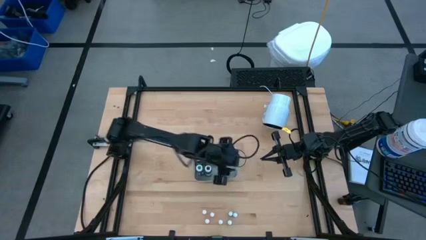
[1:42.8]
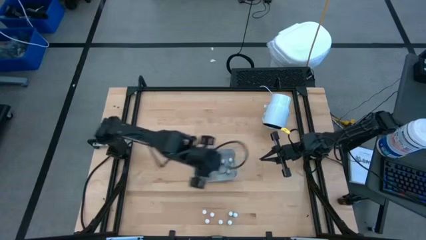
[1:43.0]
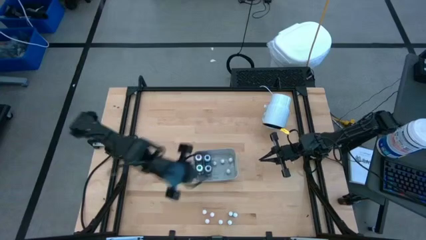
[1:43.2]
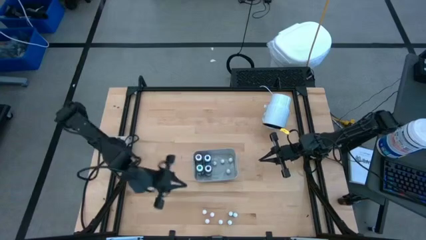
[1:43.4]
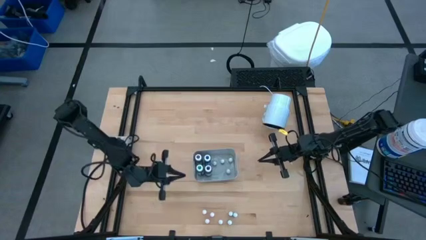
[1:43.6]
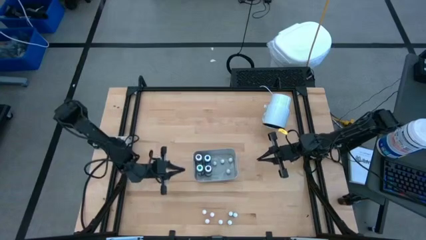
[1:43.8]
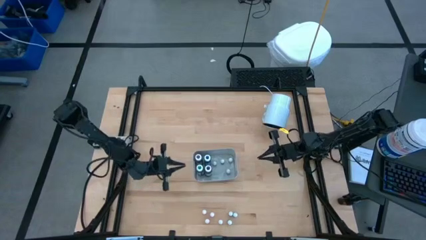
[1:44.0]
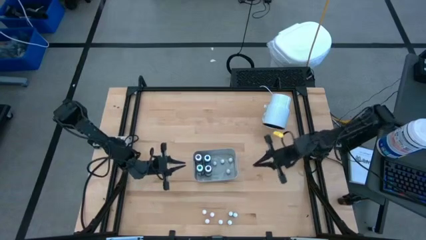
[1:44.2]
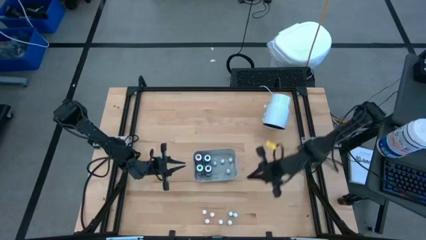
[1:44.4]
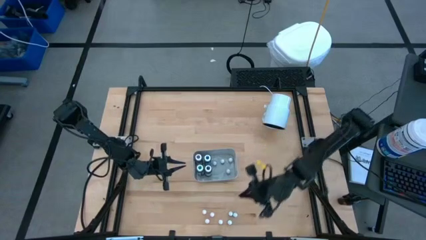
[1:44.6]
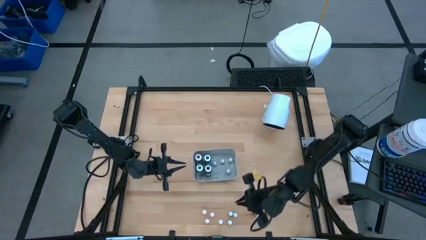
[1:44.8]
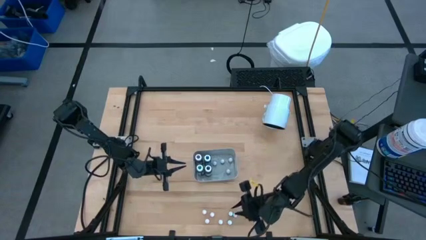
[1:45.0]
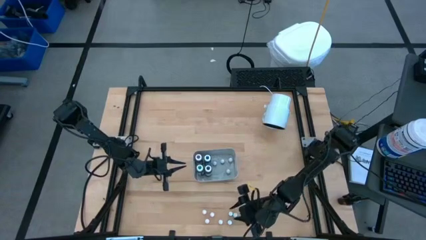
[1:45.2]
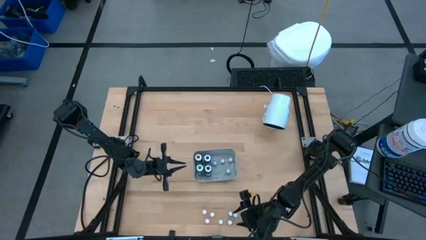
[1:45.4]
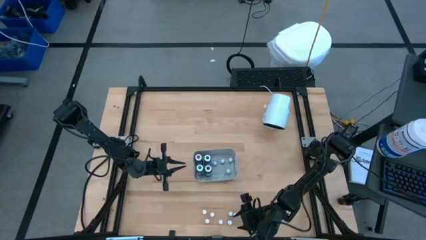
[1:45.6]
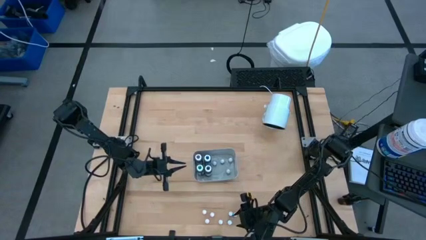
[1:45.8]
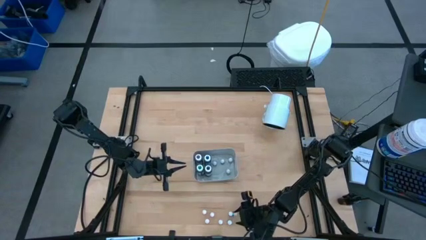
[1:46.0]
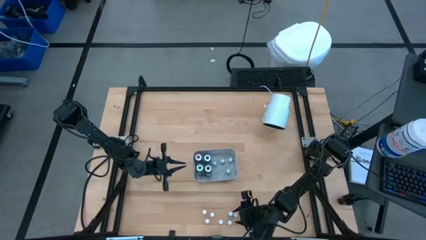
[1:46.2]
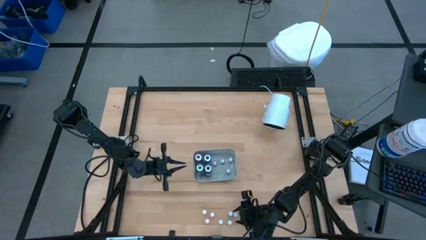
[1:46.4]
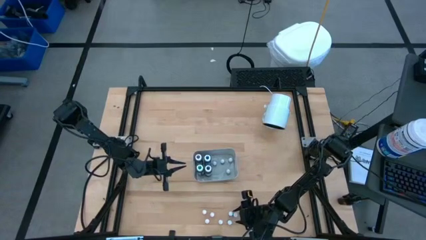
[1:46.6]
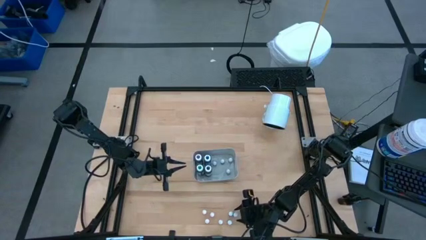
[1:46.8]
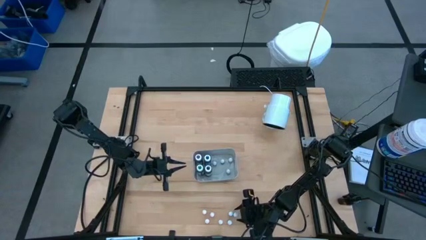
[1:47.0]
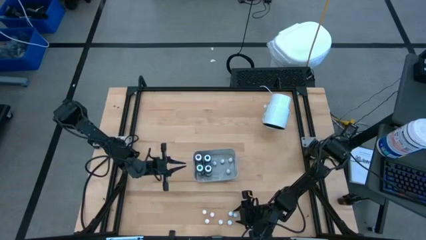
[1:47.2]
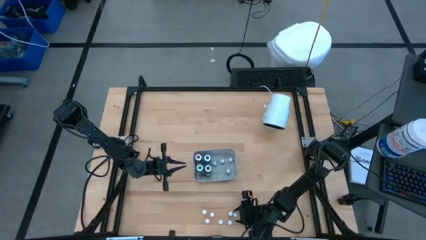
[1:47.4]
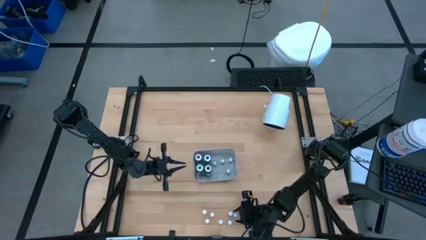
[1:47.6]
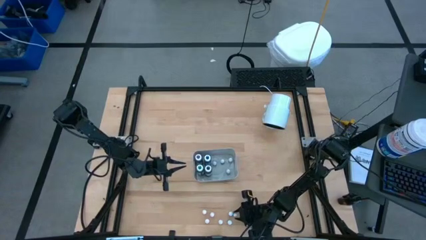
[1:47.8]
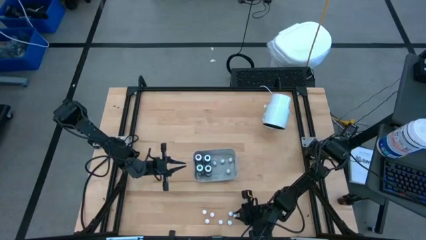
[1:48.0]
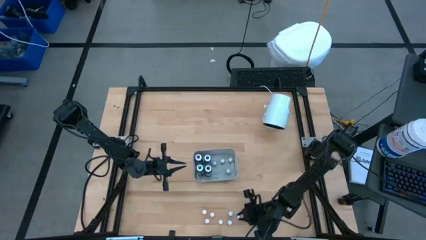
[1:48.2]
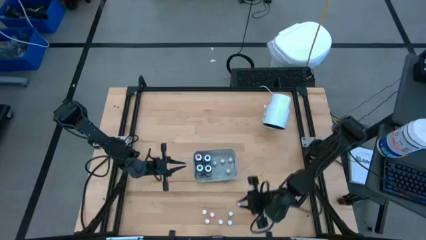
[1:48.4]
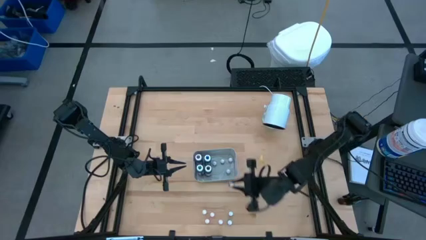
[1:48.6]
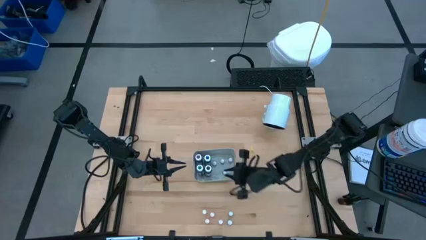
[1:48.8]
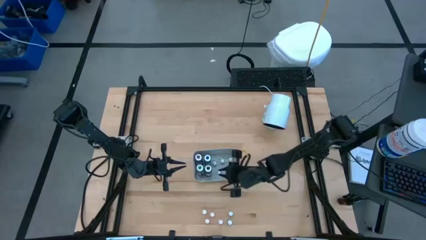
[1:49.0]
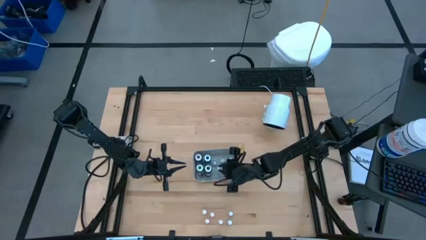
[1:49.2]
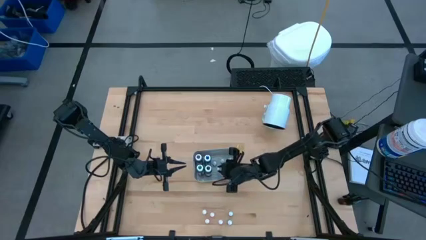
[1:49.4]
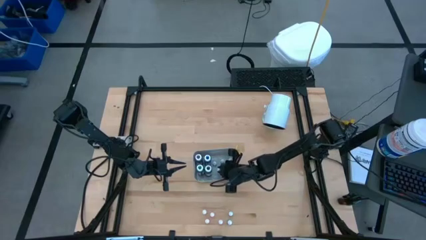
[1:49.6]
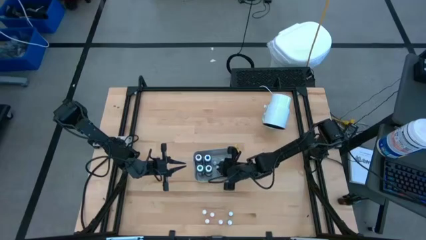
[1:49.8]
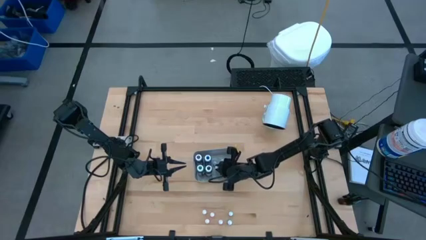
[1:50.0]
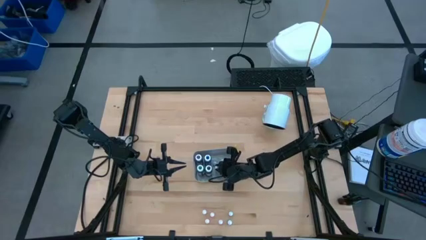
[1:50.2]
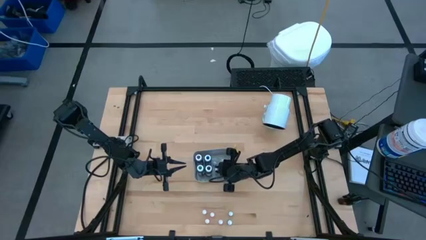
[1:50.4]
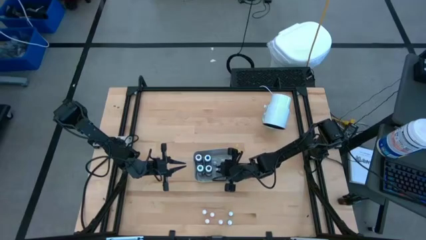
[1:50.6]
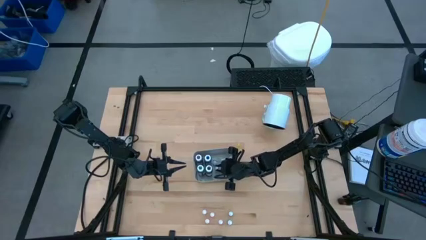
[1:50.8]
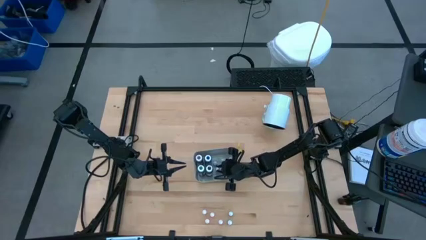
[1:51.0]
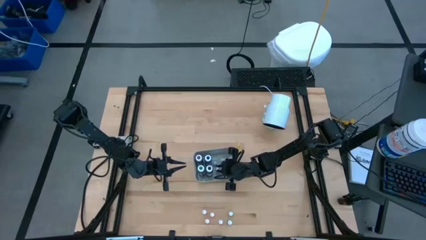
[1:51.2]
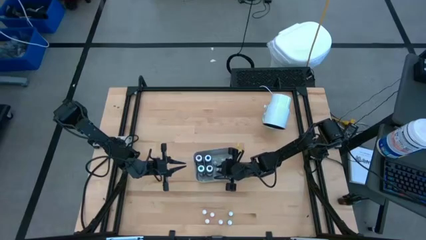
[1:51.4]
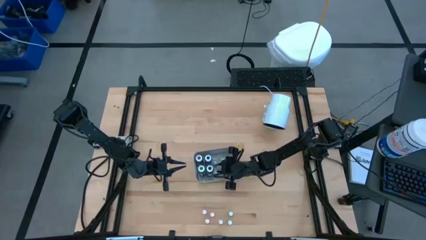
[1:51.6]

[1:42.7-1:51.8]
Task: Pick & Place food coloring
Put the small black food coloring bottle into the gray bin

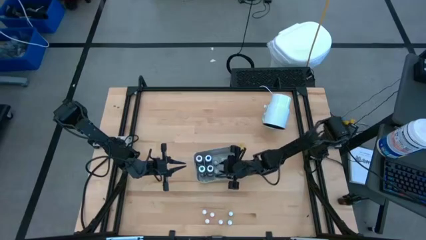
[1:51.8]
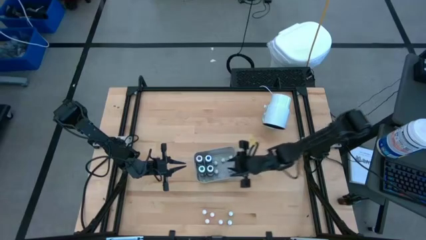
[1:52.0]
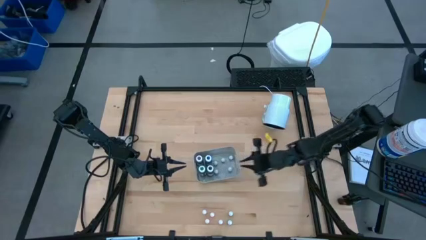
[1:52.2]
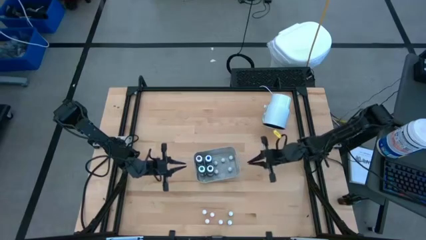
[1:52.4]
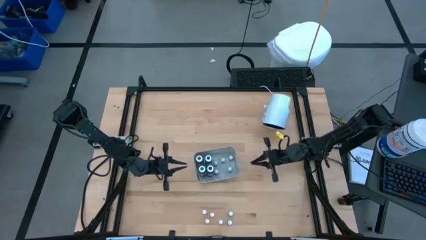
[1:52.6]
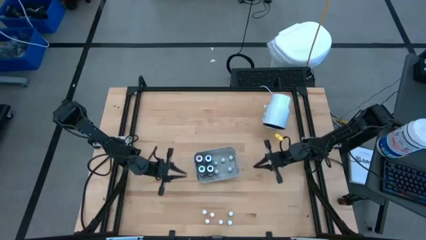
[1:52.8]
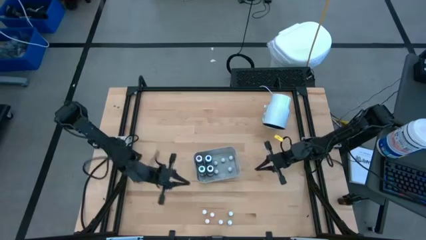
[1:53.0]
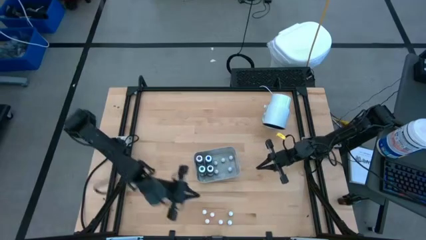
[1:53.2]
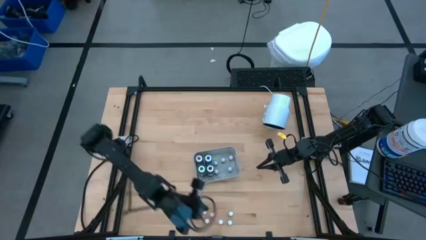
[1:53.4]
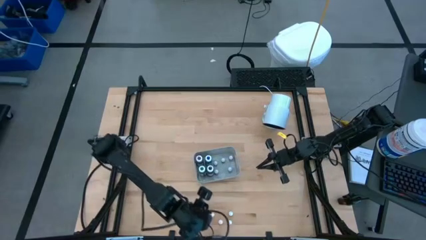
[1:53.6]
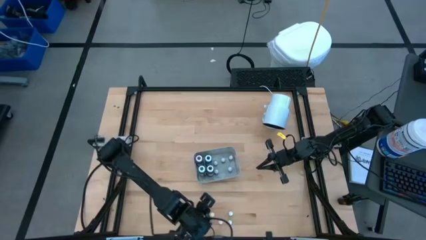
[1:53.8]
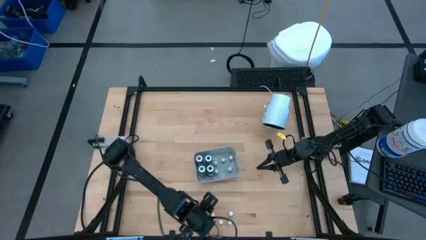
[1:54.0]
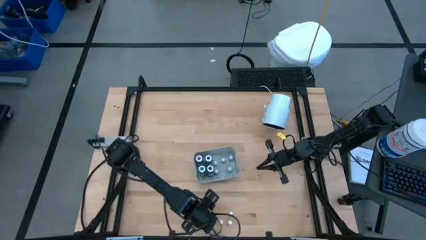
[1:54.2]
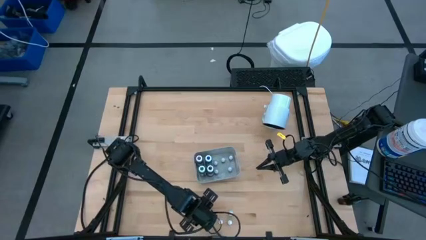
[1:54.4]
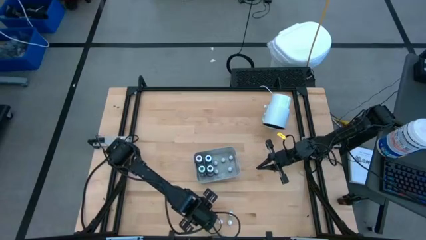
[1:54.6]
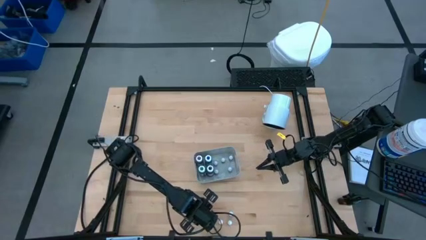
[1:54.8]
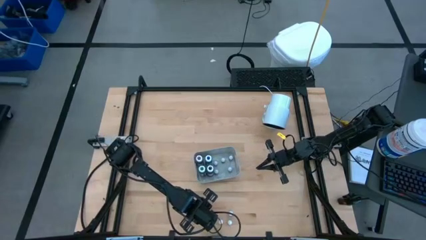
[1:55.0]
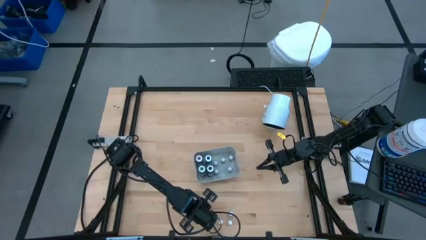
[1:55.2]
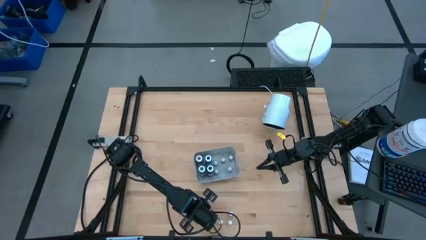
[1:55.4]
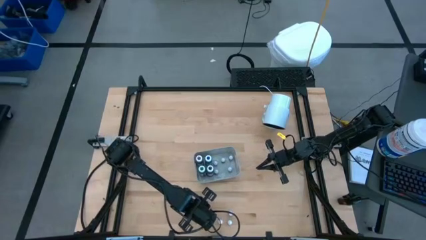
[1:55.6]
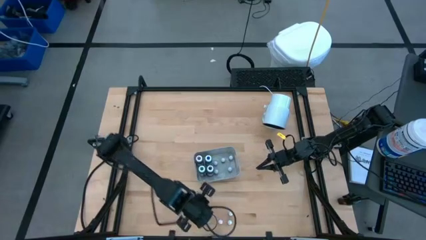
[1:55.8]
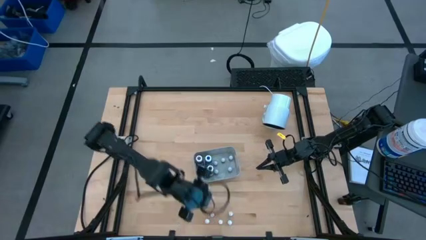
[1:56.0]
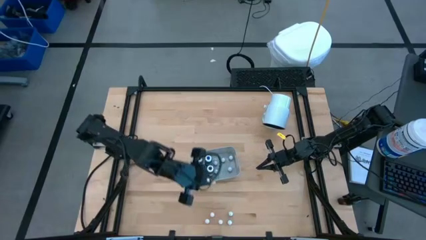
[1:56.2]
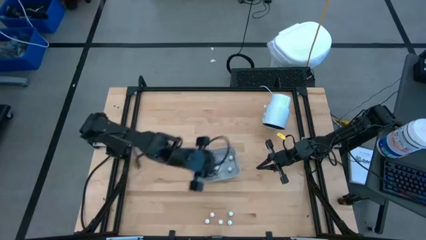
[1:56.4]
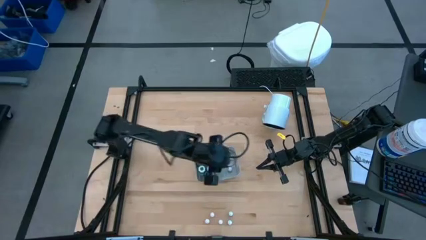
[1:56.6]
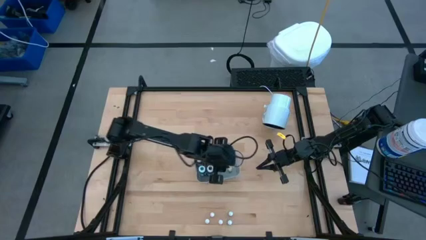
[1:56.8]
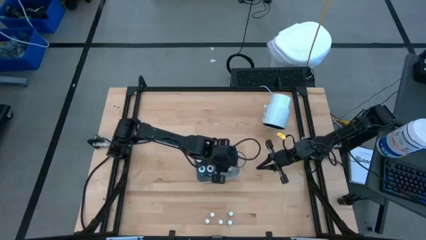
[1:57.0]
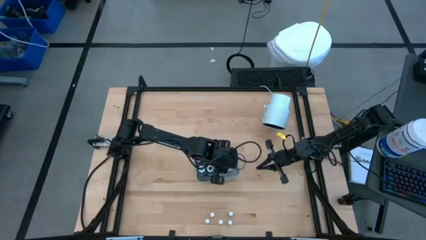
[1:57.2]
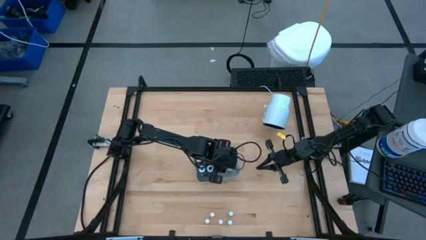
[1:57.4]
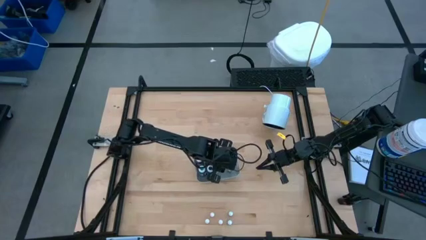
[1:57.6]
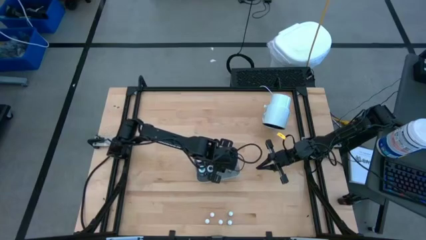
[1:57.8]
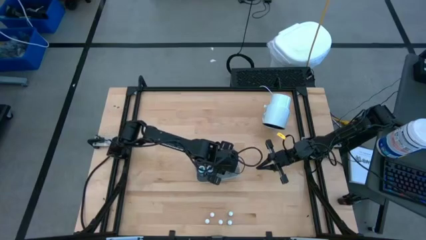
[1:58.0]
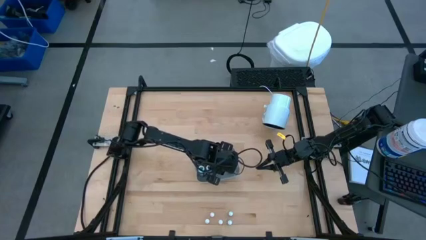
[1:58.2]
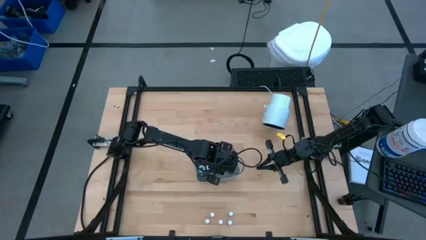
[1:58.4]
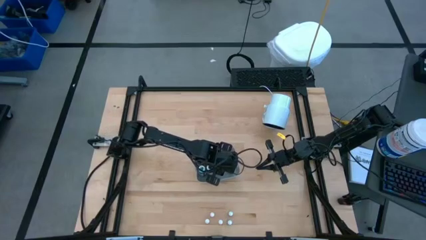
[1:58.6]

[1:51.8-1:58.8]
Put the small orange food coloring bottle into the gray bin

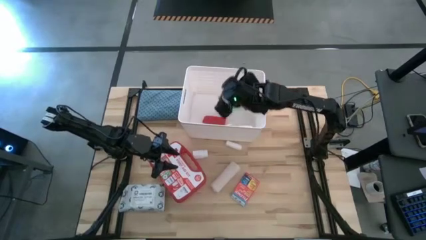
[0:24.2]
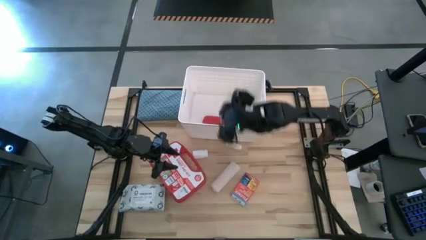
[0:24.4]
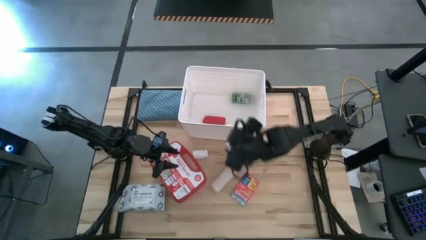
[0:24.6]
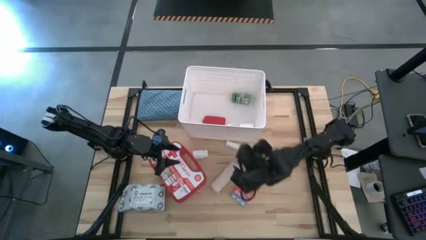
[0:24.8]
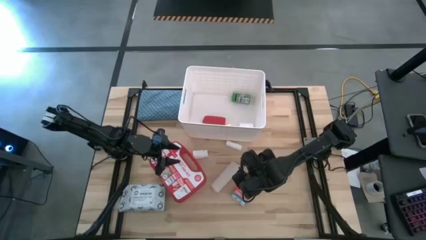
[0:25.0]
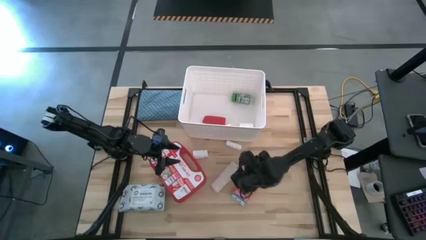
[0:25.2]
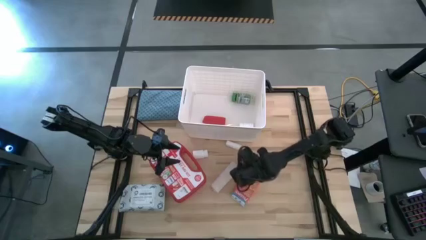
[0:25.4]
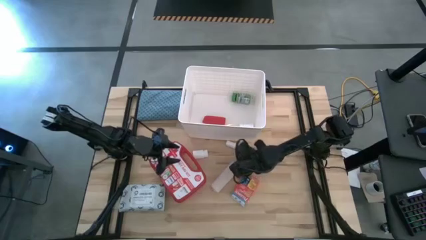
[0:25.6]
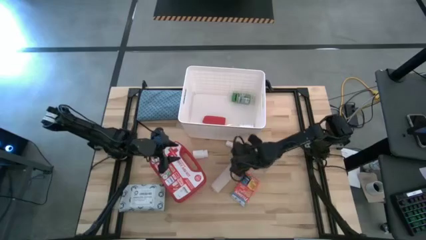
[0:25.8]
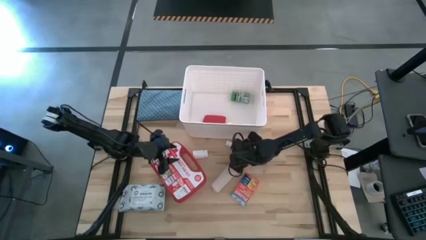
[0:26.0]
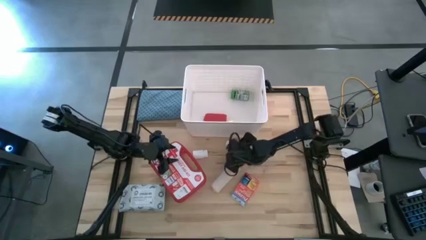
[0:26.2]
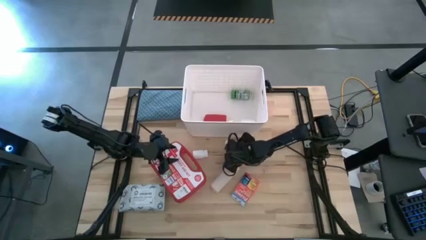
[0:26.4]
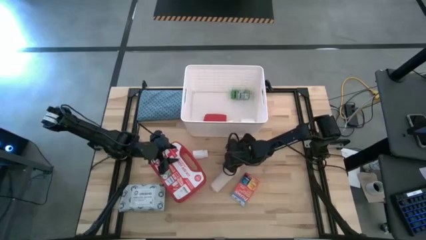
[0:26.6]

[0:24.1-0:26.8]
Task: Pick & place medical supplies in basket/bin
Put the rolled gauze in the white bin
